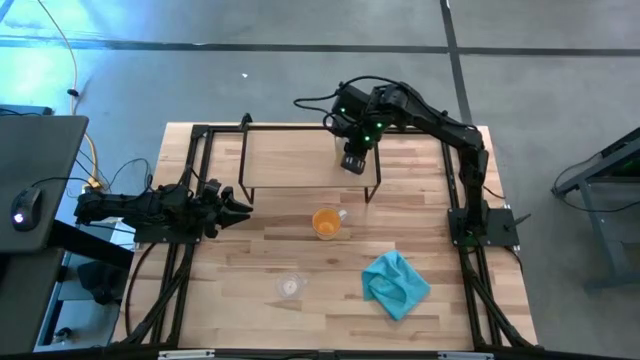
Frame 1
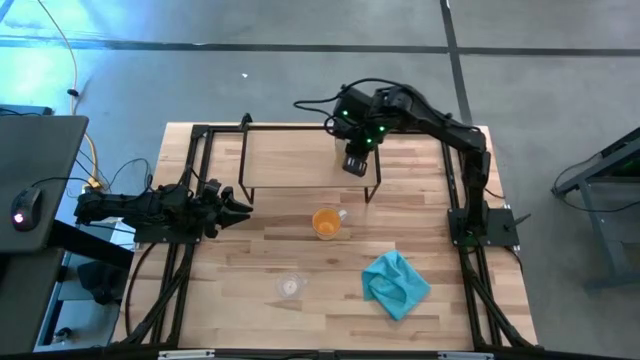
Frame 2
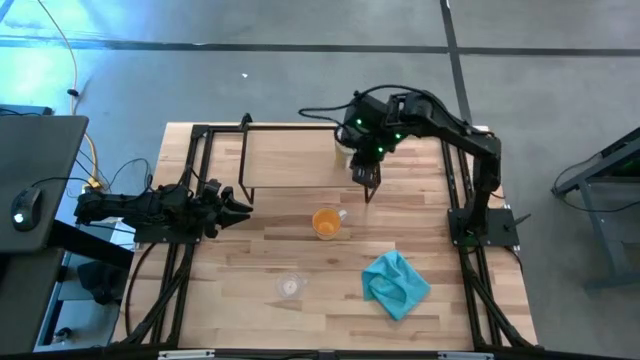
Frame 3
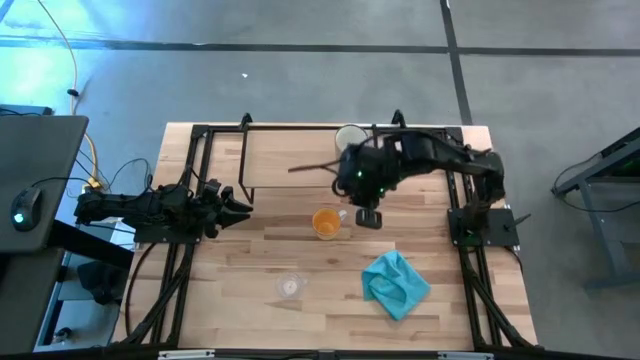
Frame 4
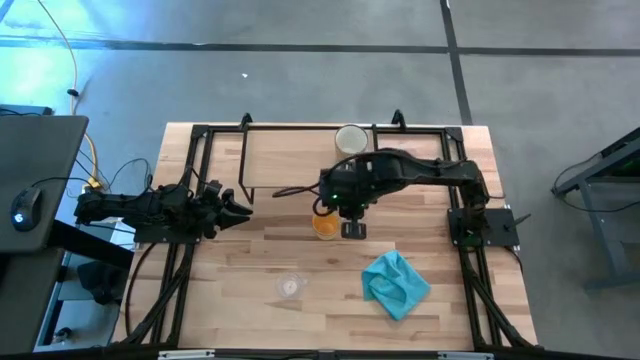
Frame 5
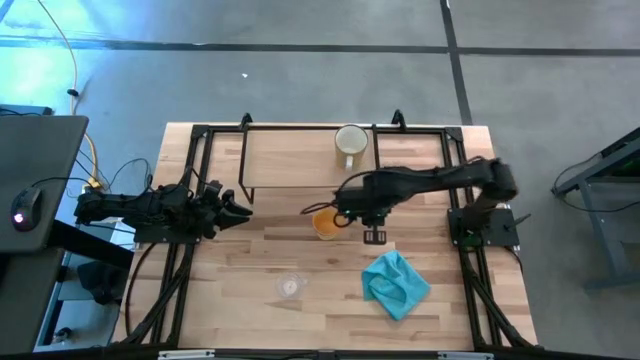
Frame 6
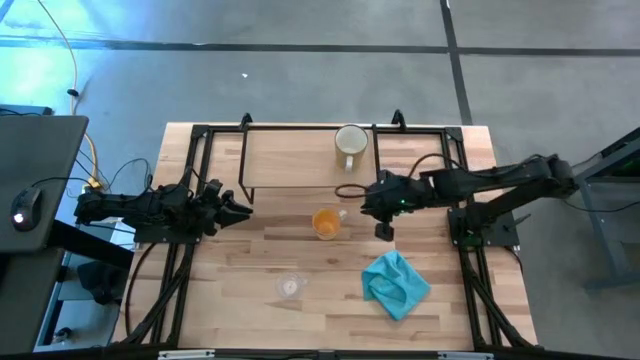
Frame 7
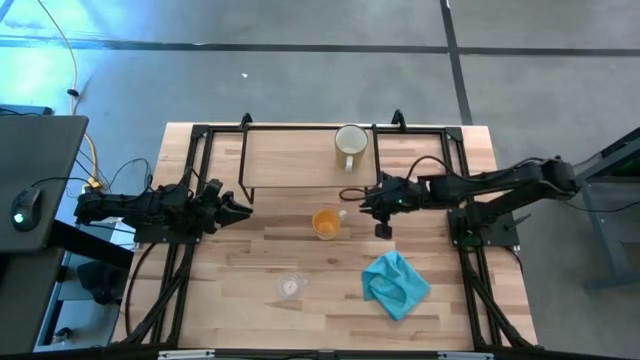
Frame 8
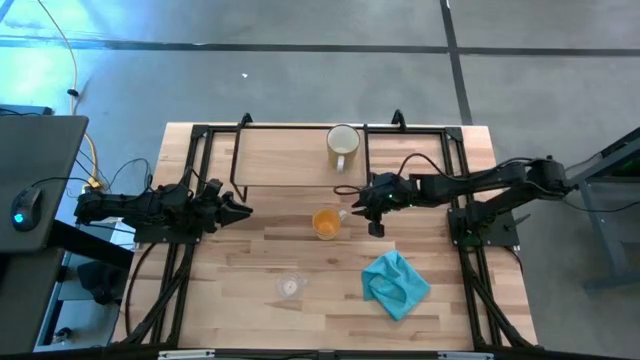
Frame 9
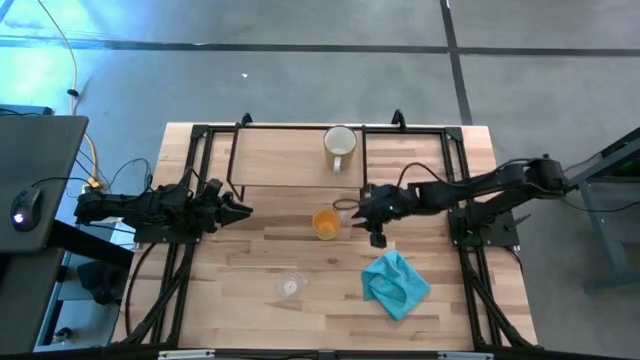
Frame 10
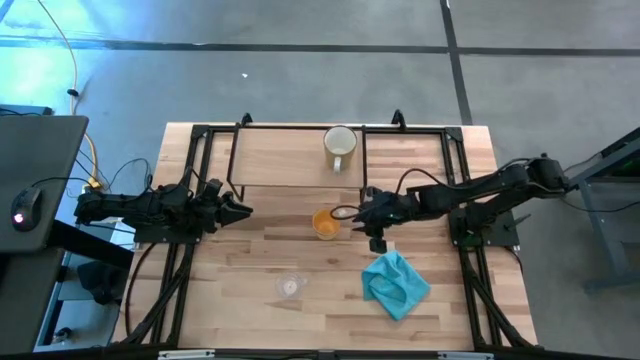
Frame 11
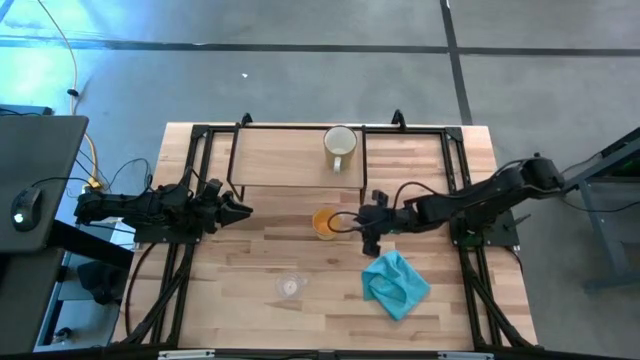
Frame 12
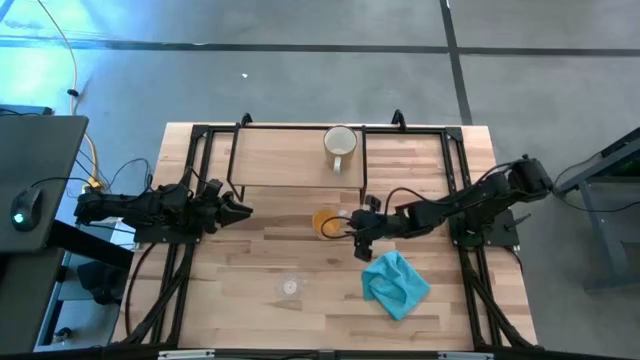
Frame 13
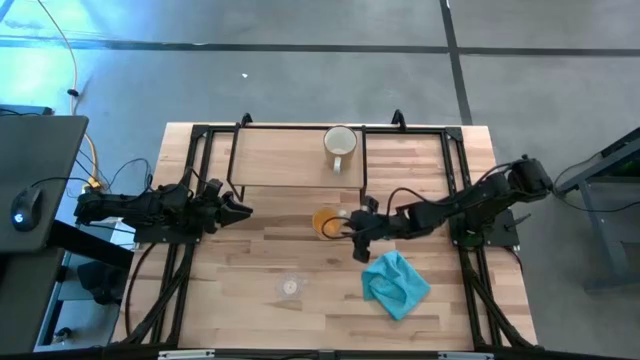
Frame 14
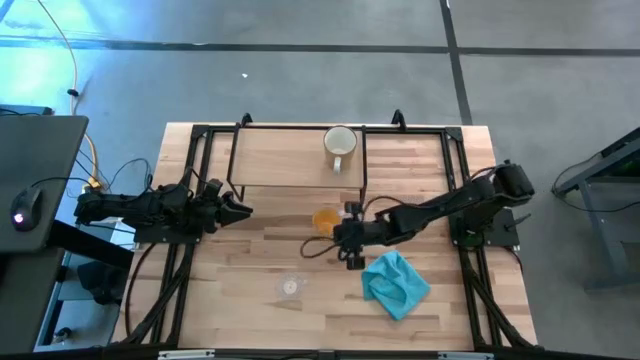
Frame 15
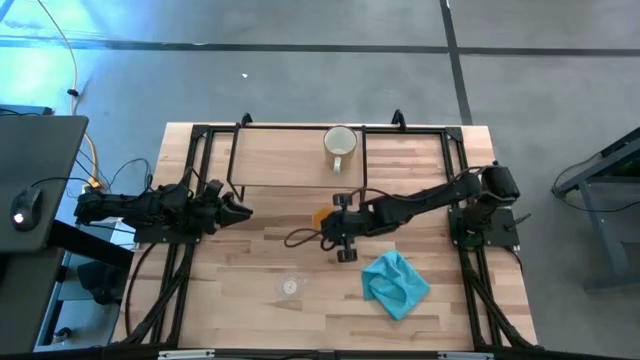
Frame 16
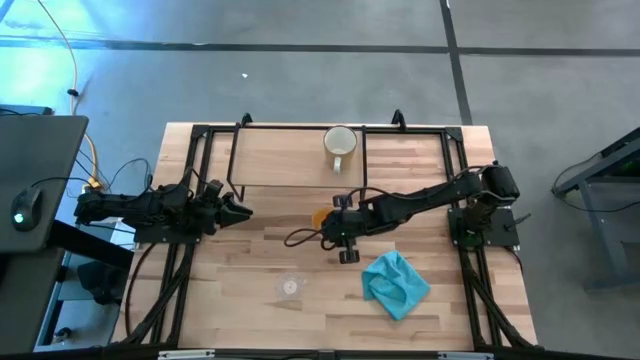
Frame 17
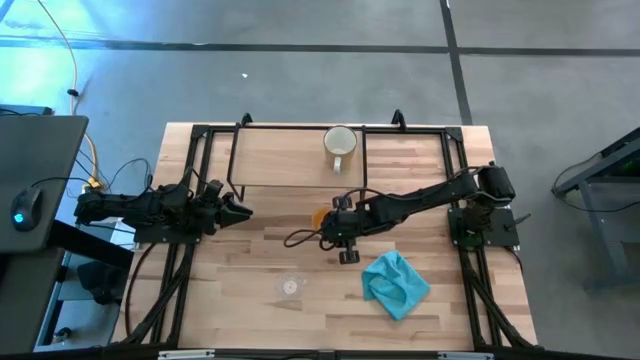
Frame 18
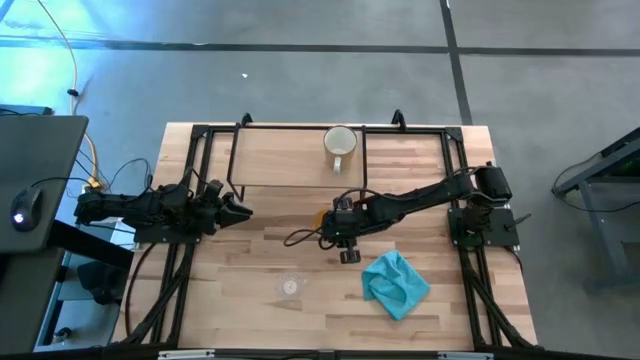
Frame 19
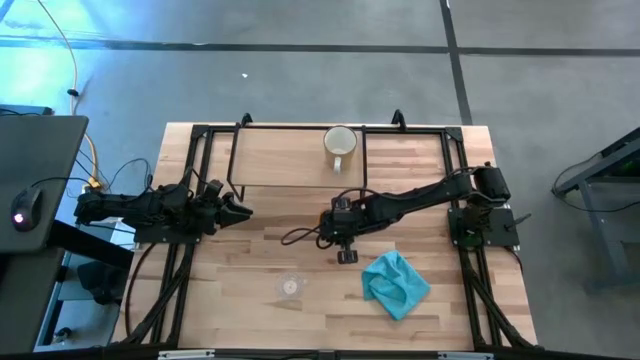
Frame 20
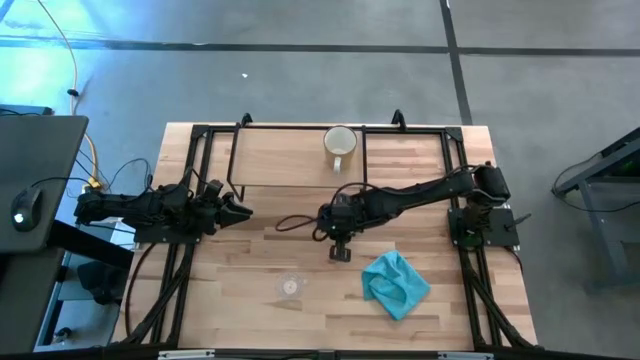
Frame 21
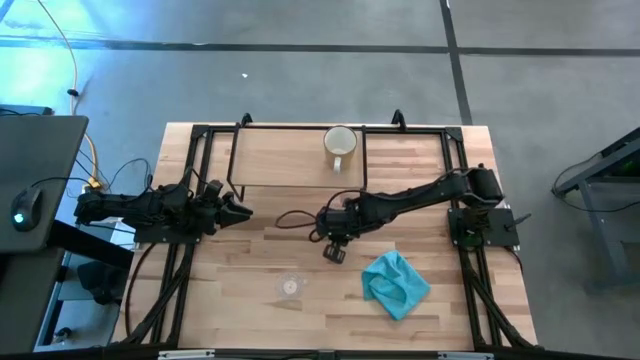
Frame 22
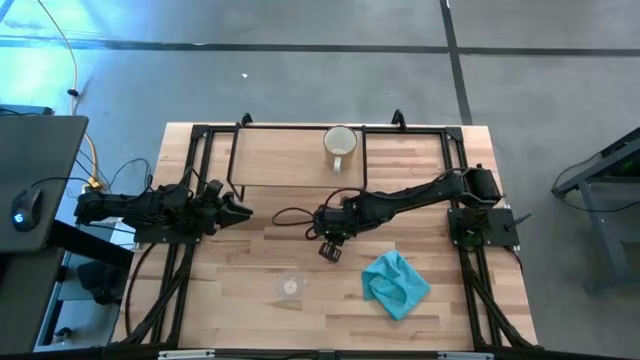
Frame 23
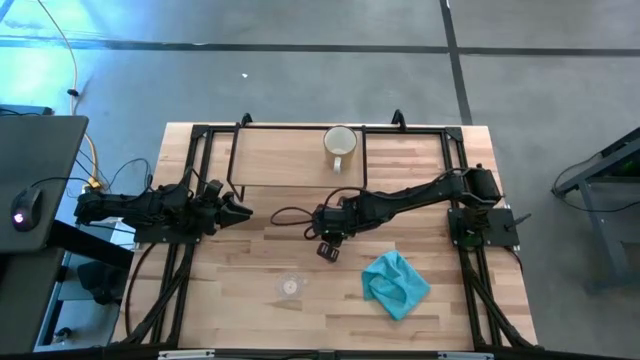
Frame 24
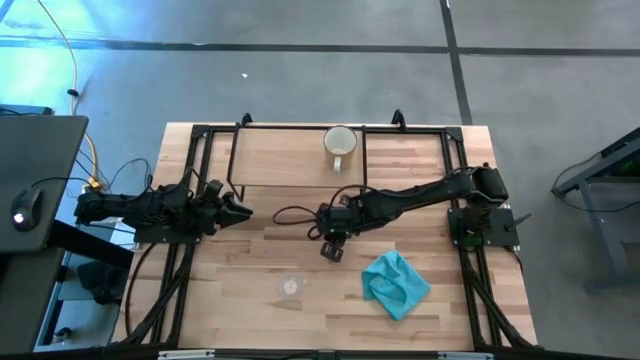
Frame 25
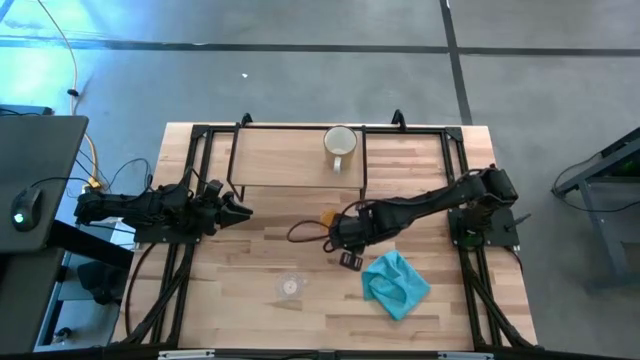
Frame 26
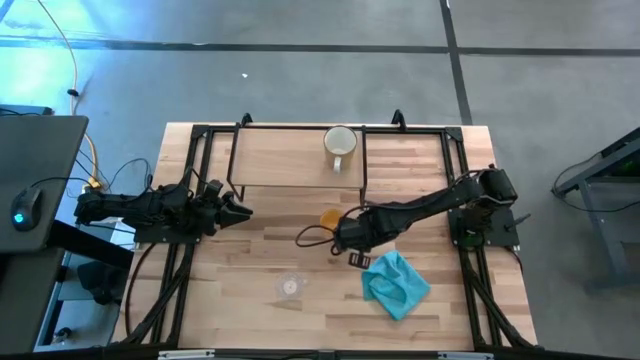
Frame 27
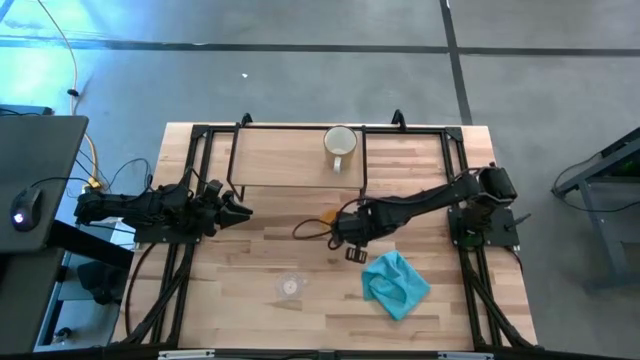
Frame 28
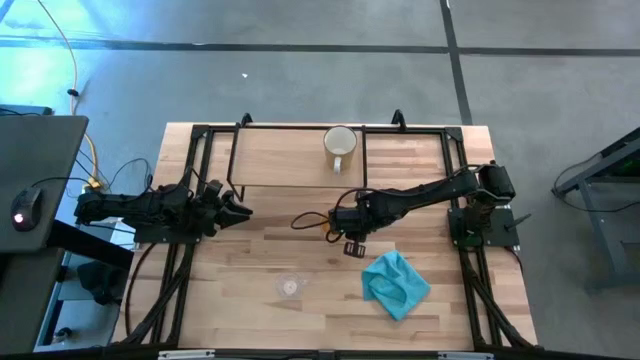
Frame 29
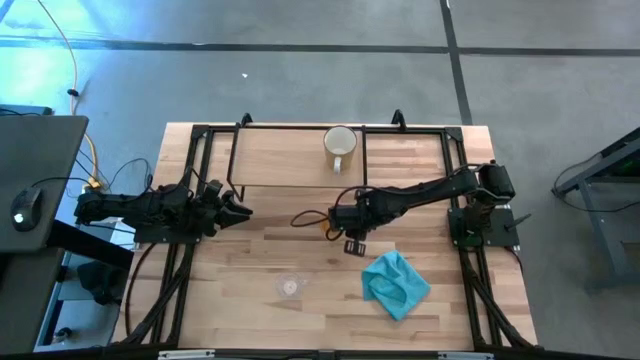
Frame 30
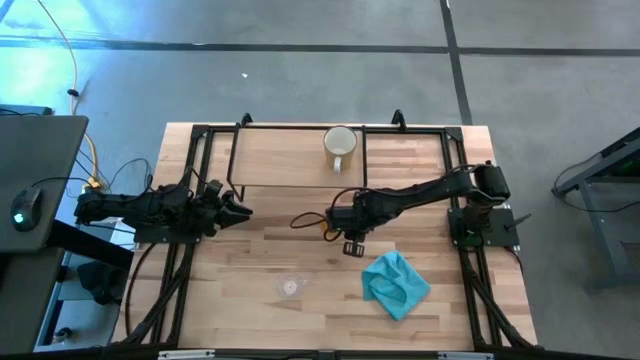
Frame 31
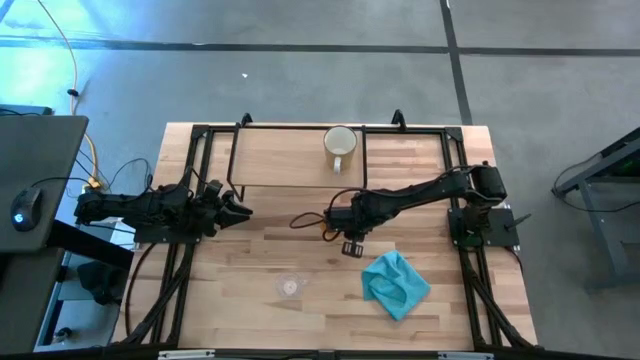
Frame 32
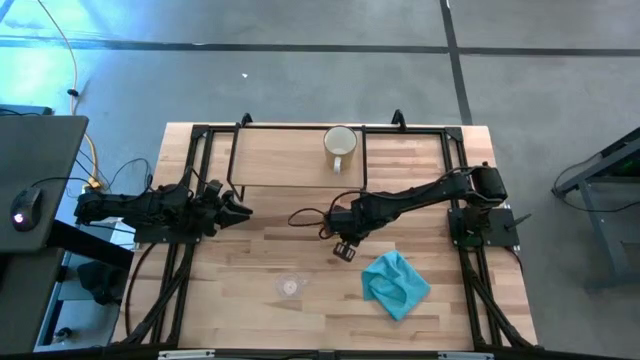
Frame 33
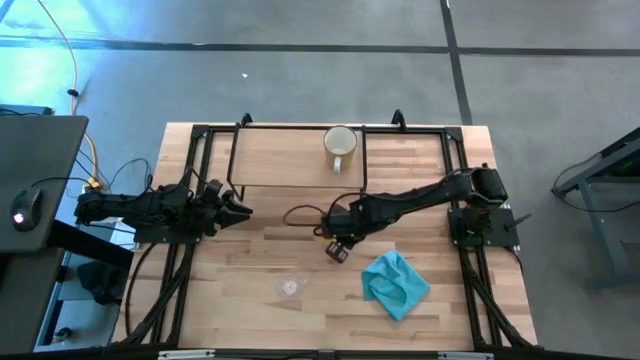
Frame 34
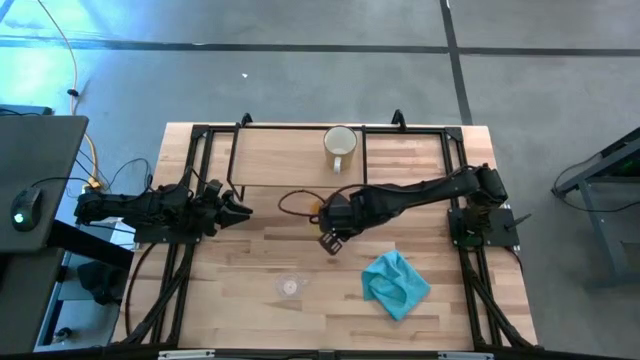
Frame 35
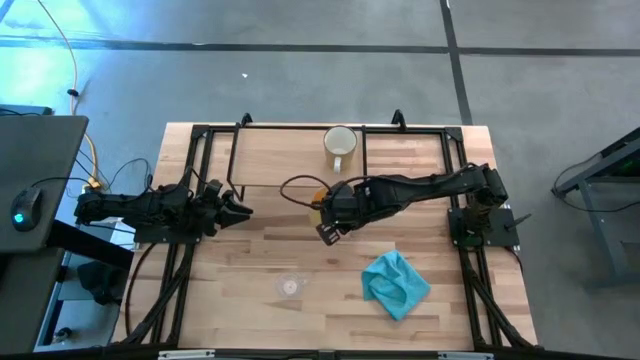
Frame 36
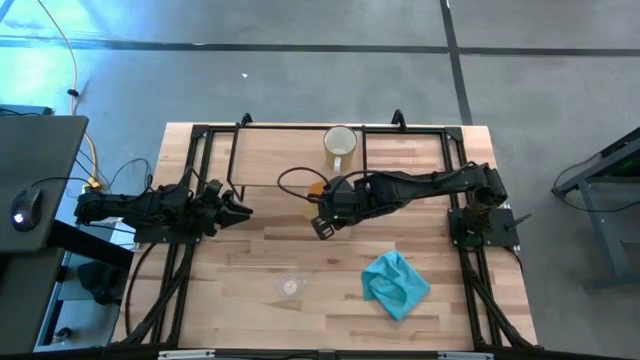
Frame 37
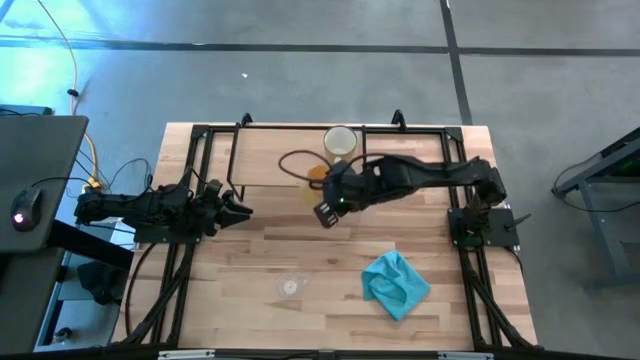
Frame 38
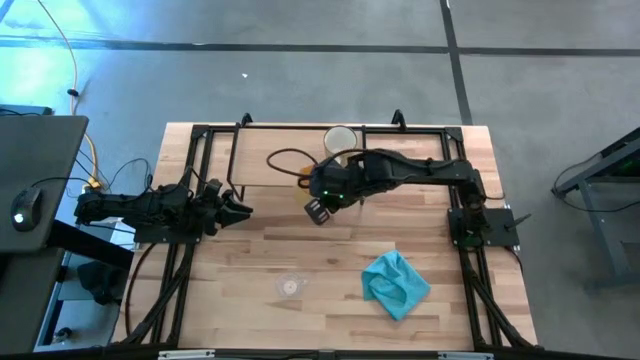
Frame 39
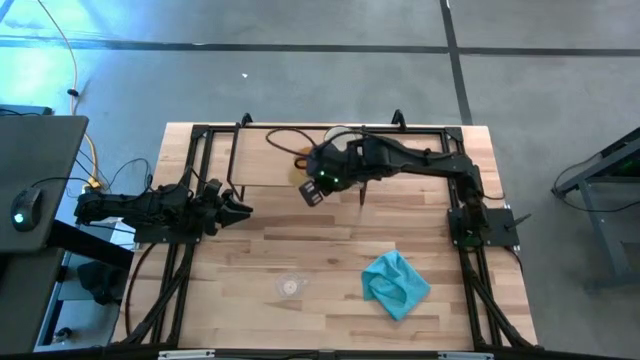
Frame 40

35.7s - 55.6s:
Task: Stack small to large cups/mugs on shelf
Put the yellow mug on the shelf
